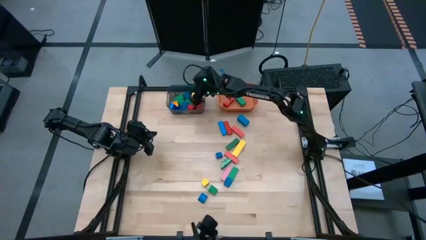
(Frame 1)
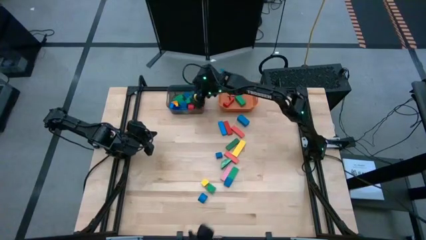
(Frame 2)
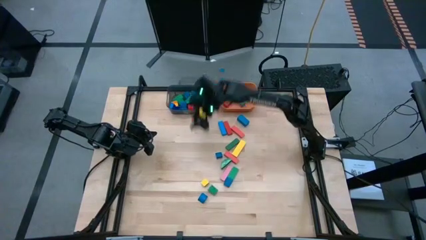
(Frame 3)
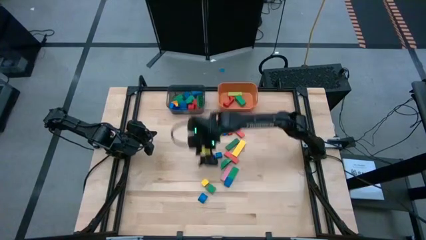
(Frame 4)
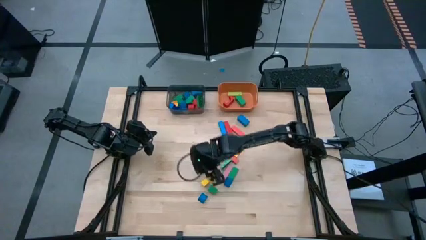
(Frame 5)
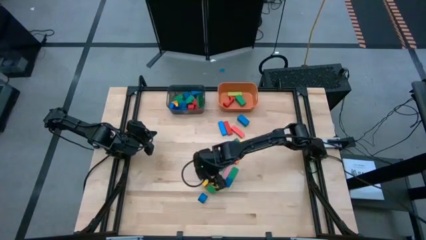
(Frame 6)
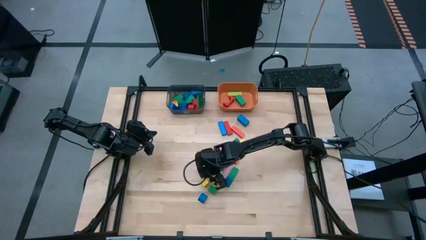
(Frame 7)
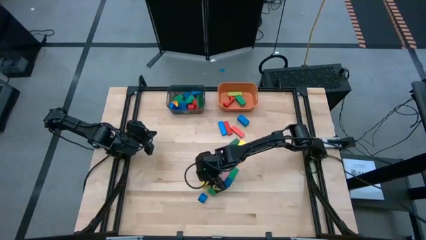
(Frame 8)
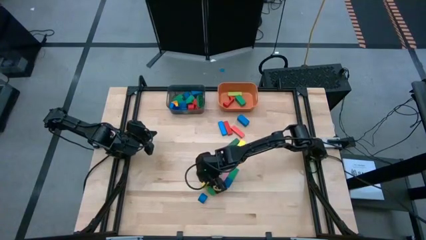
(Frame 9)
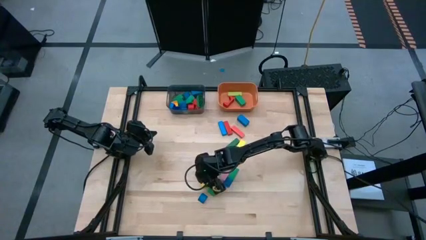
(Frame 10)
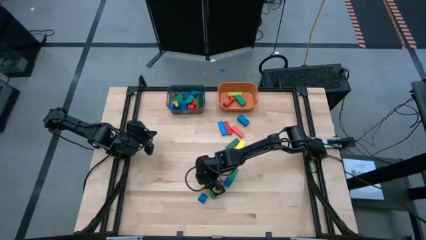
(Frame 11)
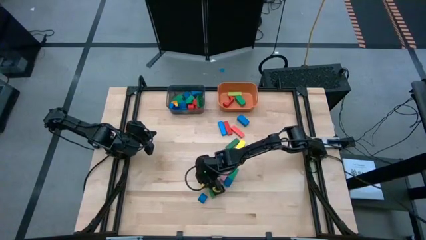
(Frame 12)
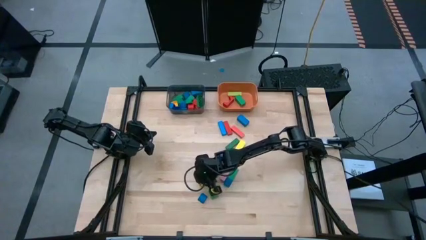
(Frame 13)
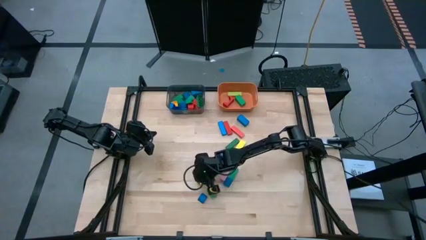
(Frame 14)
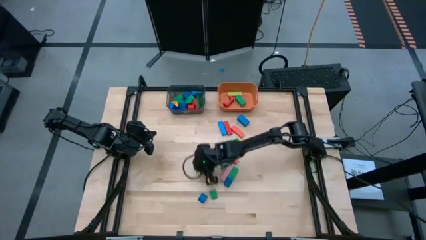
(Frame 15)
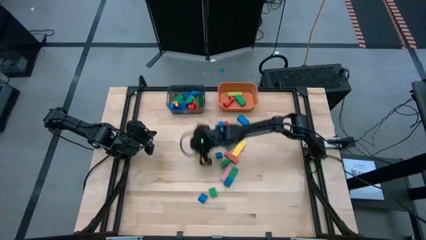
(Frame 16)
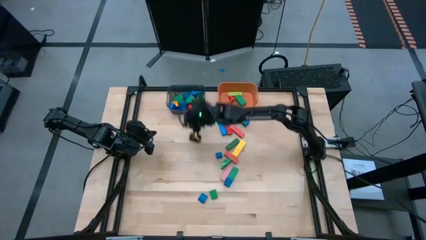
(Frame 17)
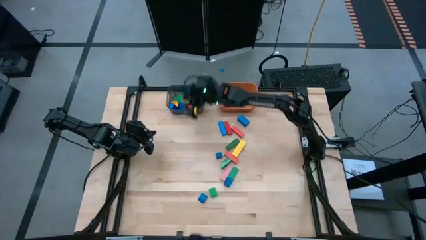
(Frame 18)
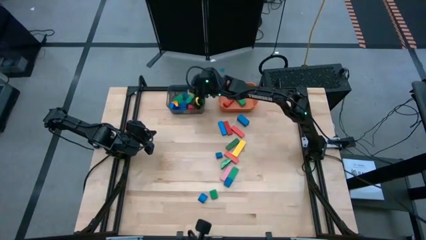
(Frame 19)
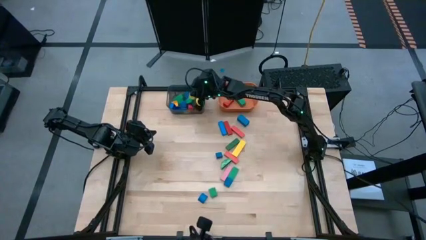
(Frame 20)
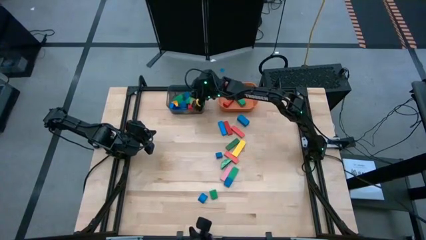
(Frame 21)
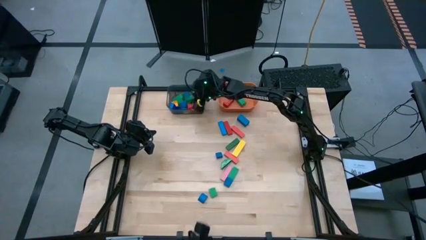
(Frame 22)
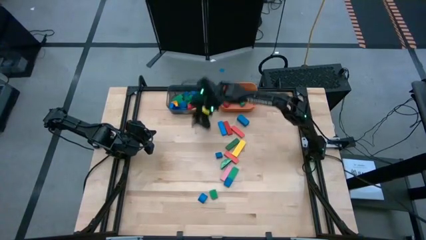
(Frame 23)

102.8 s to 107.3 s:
Task: Sort blocks by size
Put the small yellow block into the black bin

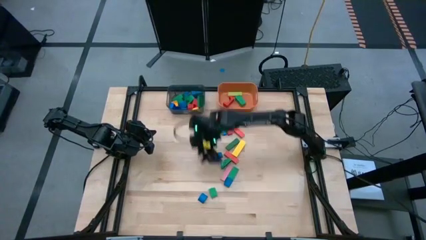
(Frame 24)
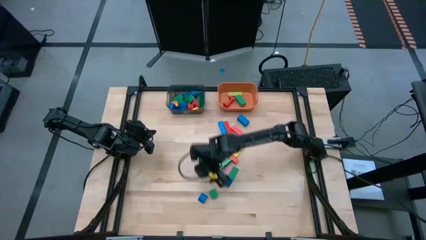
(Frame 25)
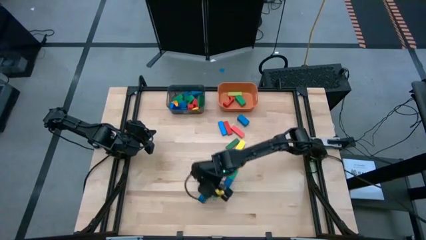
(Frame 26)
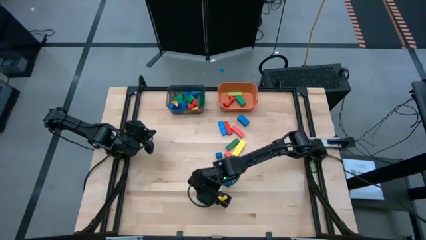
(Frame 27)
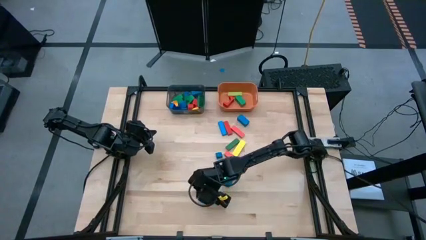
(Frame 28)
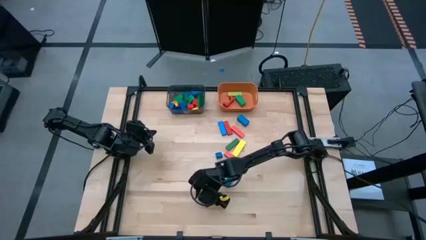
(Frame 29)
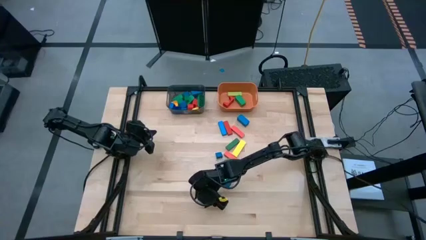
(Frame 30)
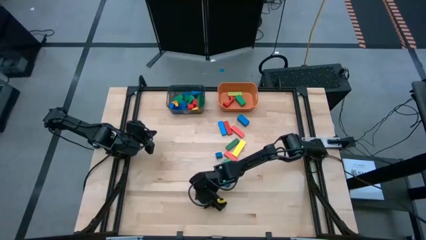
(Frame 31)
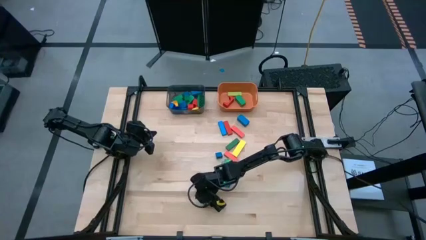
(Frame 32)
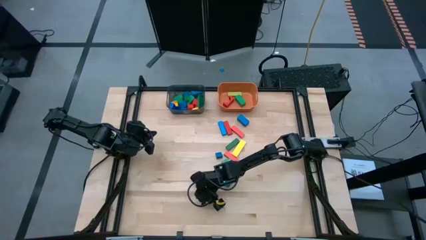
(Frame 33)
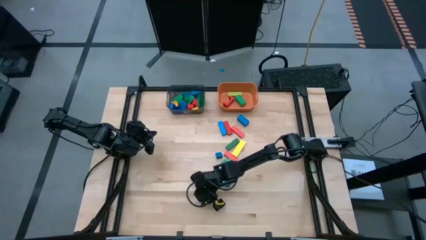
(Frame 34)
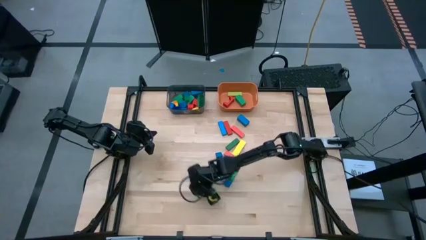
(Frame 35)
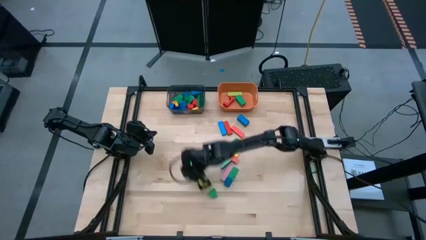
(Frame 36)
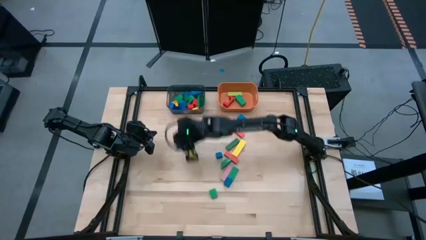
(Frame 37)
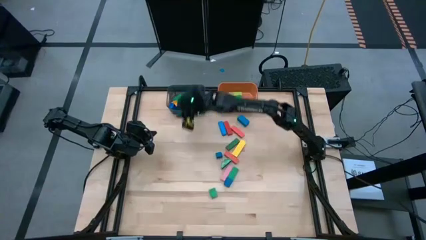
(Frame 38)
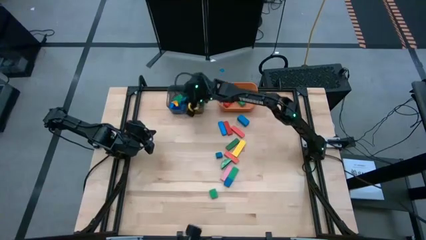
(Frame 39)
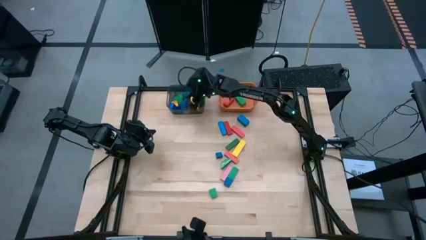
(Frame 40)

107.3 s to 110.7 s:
Put the small blue block into the black bin

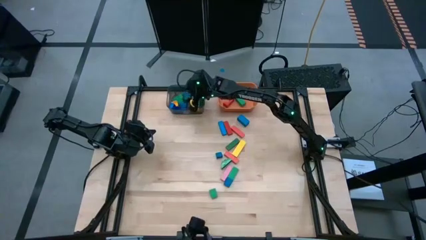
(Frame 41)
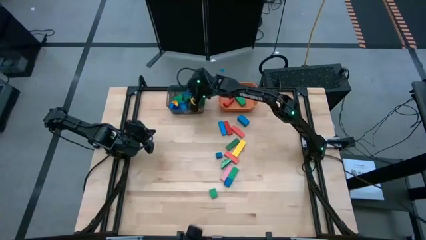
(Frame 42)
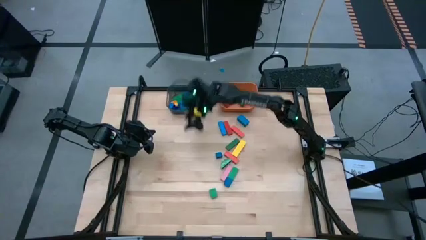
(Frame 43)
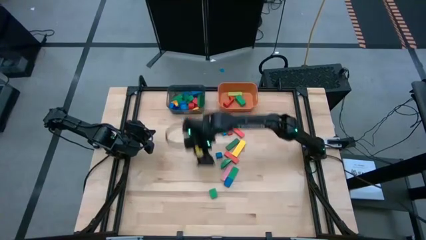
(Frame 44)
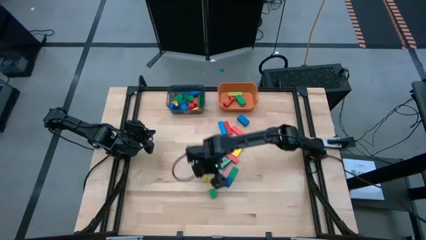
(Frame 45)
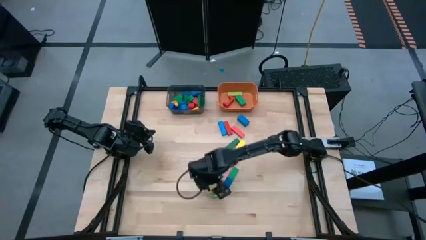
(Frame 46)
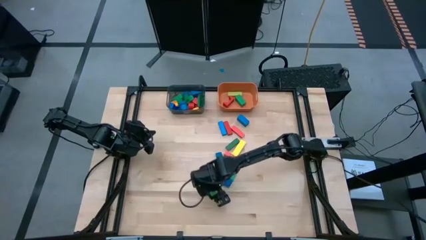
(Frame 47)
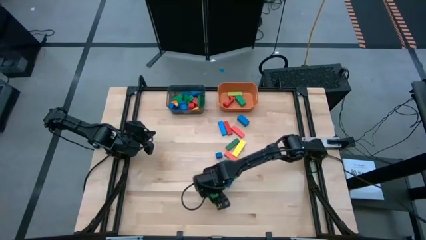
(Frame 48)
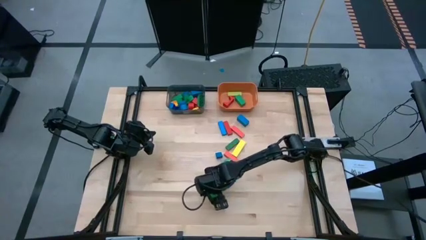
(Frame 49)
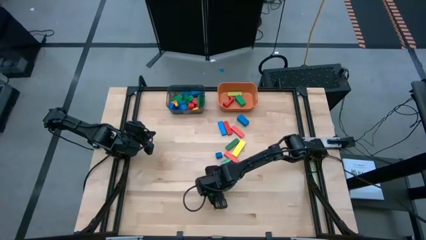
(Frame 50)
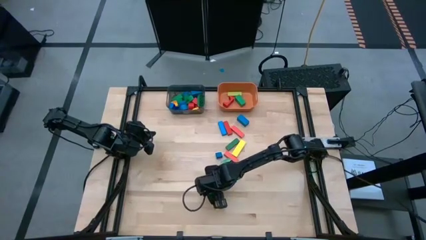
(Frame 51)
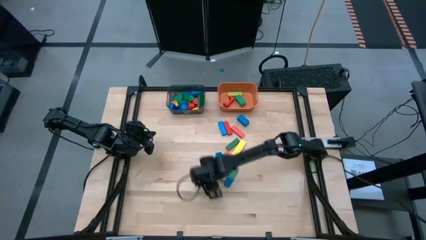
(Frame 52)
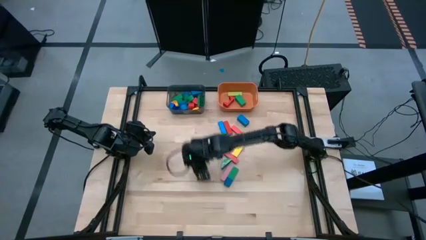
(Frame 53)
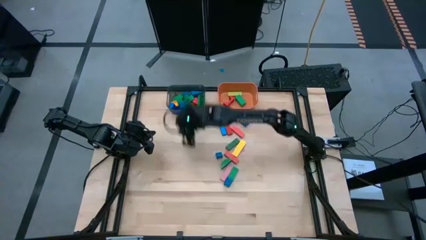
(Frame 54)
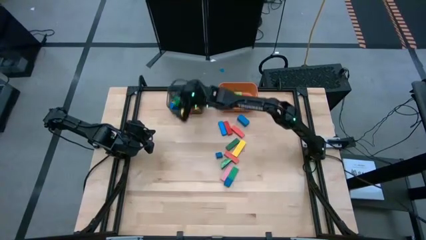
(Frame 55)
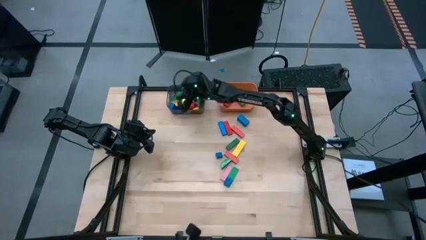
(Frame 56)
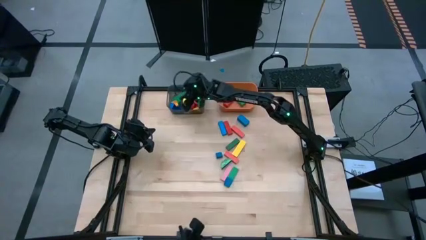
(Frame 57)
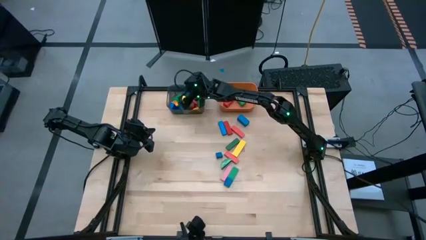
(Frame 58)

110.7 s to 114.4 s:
Put the green triangular block into the black bin

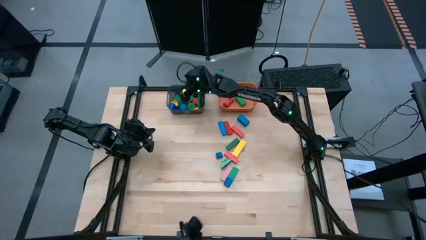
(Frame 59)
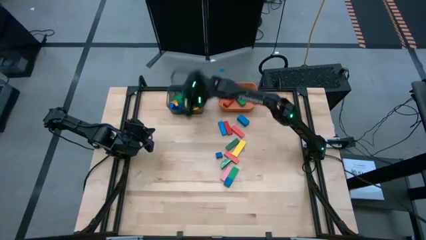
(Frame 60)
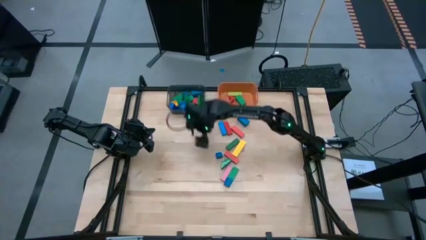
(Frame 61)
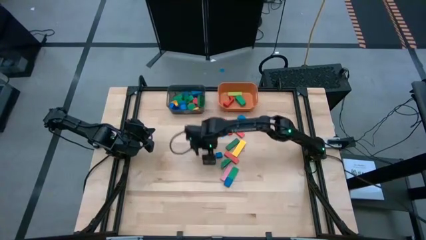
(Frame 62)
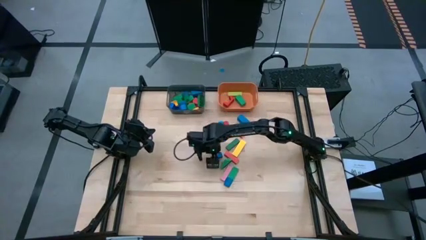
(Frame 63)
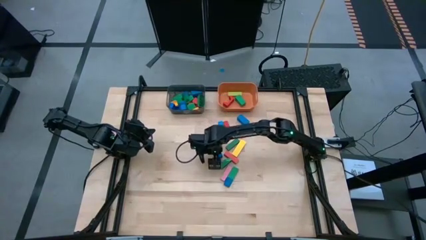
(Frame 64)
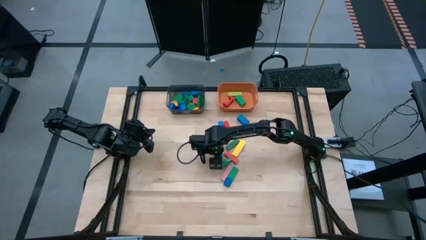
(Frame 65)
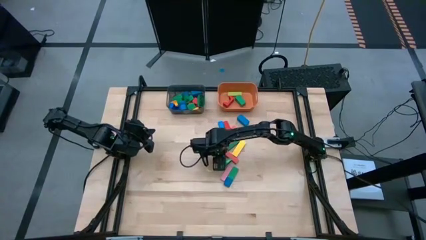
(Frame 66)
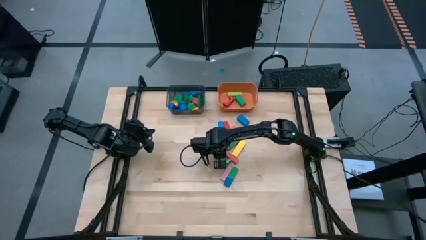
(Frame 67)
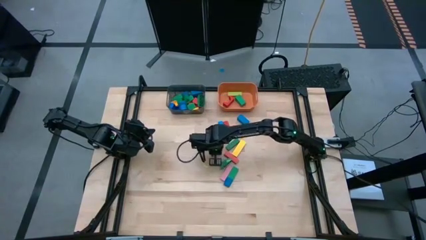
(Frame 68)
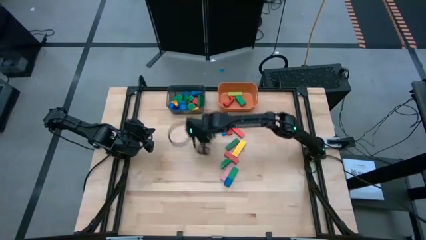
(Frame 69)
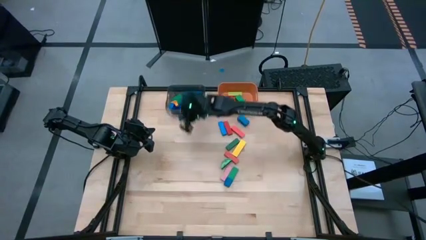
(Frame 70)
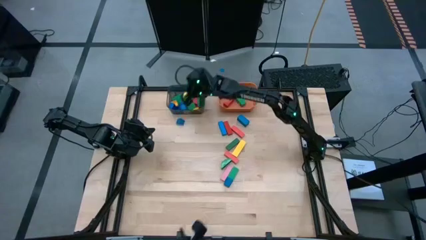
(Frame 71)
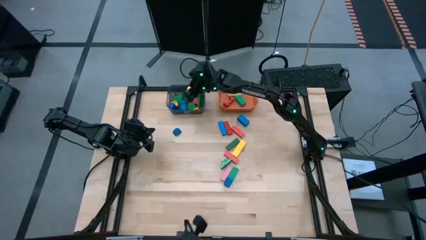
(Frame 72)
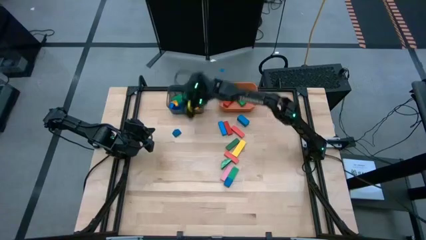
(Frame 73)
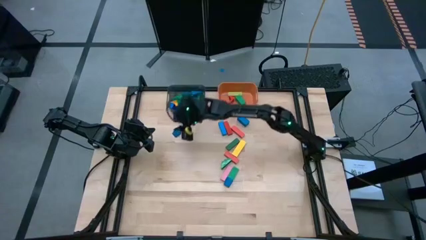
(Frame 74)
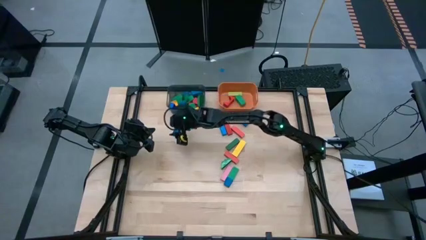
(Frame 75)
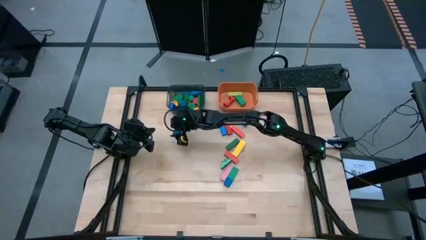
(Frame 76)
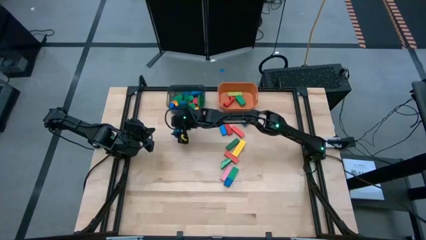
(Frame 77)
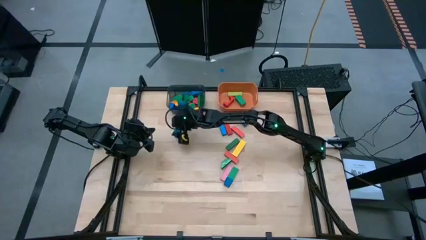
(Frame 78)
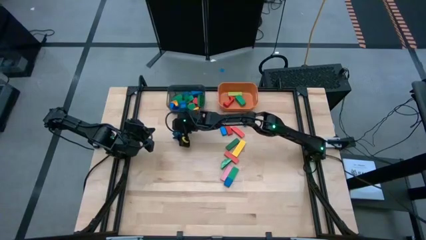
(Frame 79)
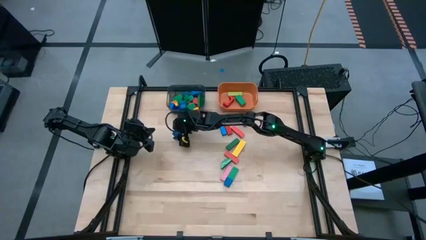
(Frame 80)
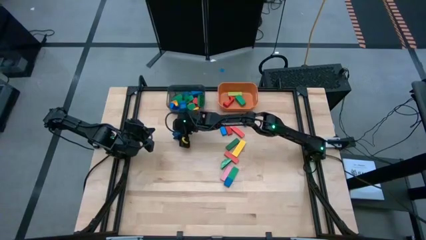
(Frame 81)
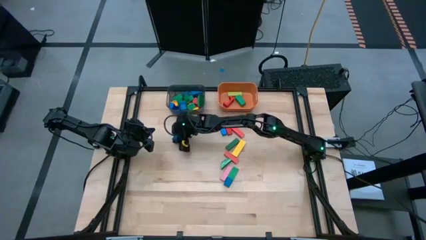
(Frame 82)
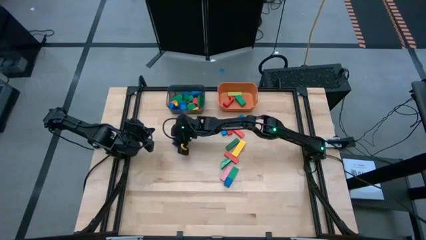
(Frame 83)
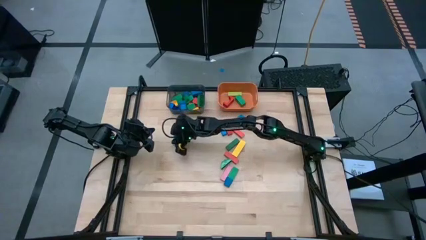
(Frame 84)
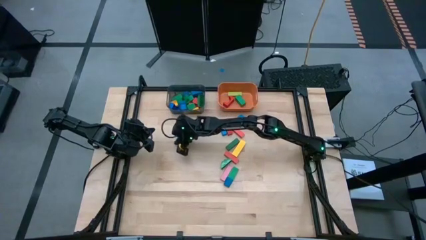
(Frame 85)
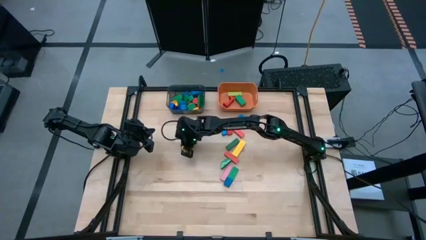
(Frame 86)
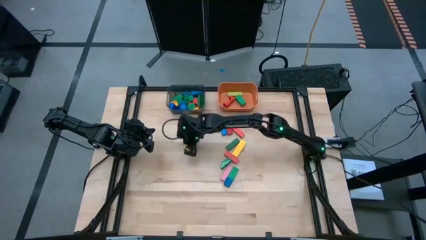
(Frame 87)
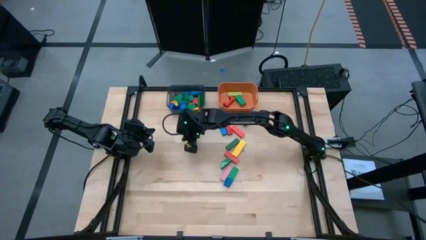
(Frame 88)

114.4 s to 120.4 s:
Put the small blue block into the black bin
